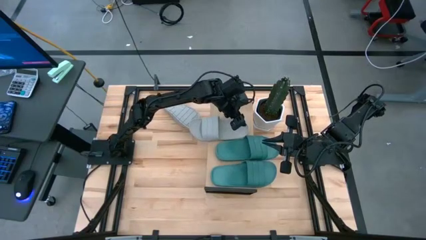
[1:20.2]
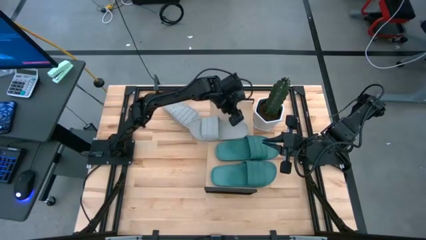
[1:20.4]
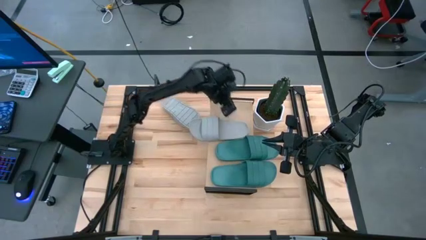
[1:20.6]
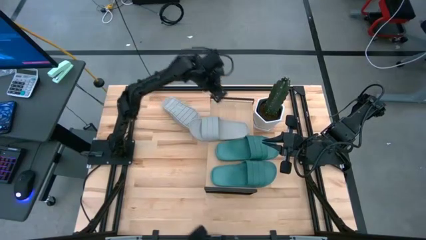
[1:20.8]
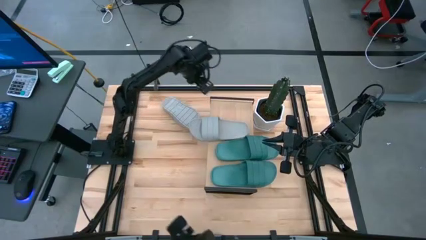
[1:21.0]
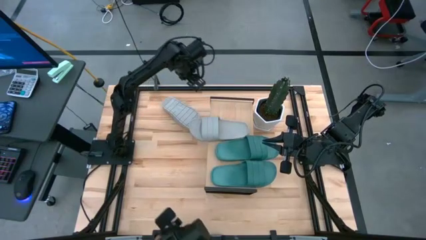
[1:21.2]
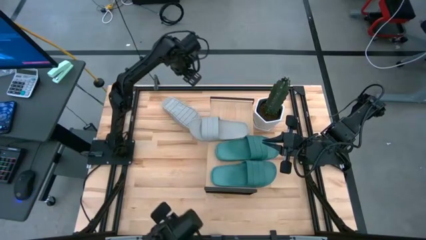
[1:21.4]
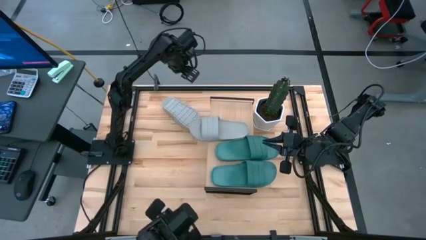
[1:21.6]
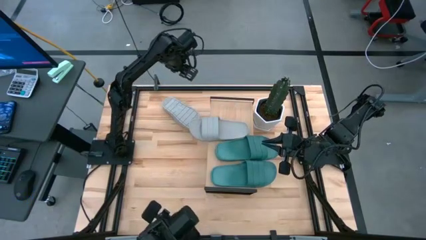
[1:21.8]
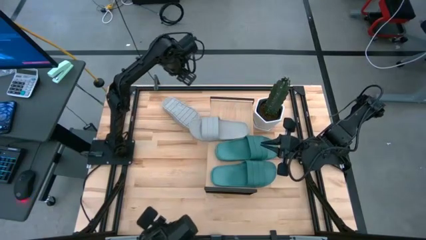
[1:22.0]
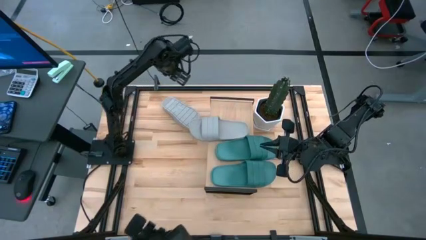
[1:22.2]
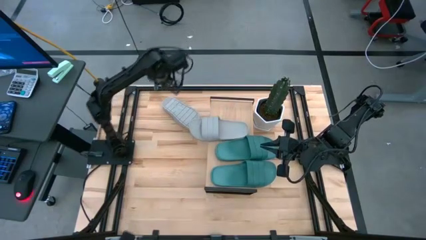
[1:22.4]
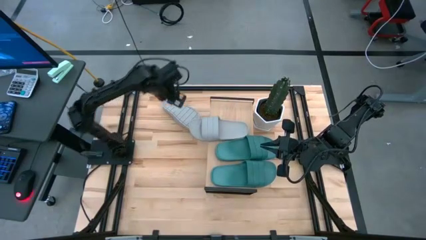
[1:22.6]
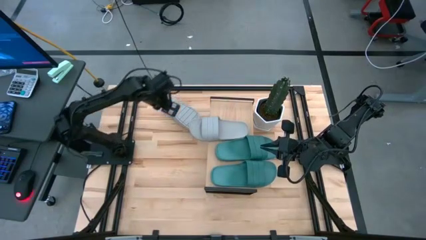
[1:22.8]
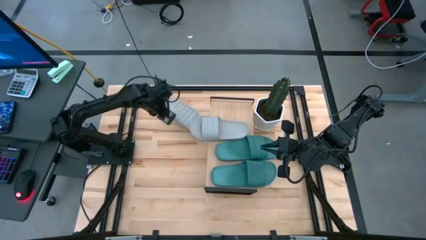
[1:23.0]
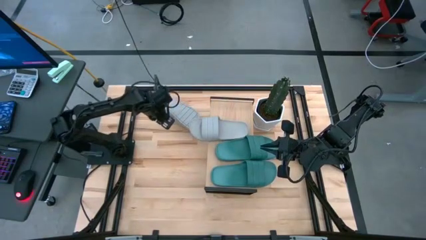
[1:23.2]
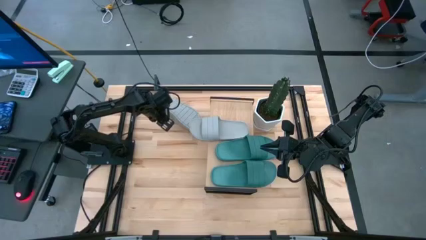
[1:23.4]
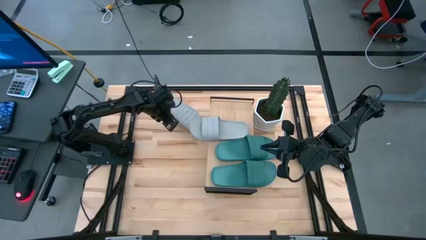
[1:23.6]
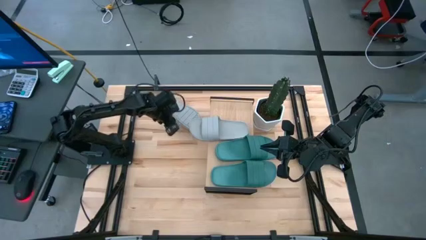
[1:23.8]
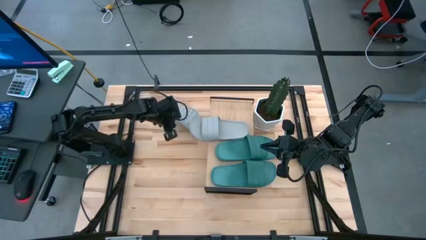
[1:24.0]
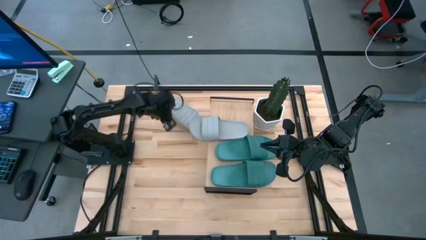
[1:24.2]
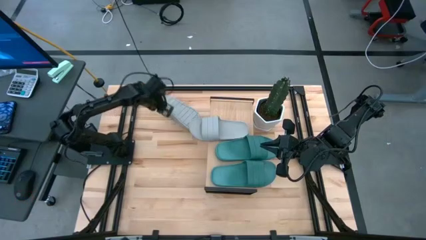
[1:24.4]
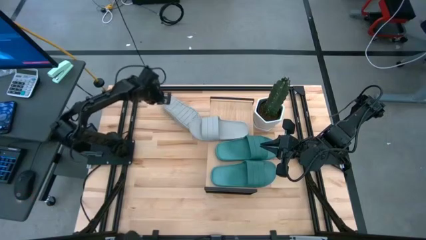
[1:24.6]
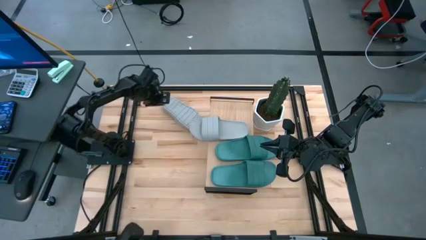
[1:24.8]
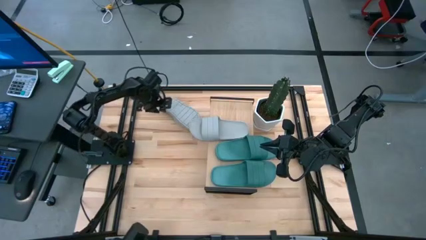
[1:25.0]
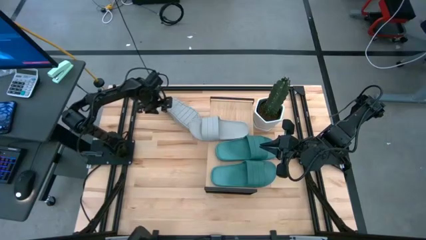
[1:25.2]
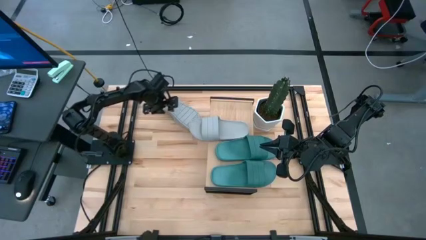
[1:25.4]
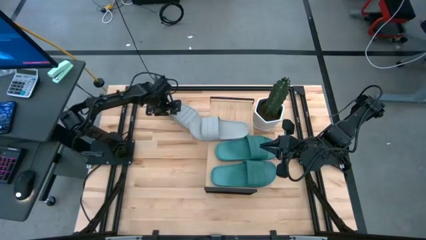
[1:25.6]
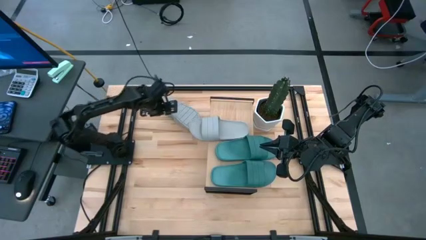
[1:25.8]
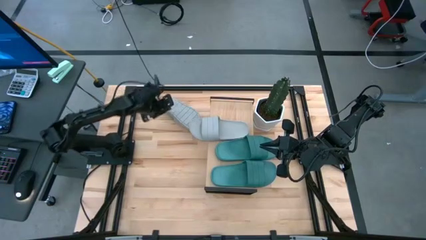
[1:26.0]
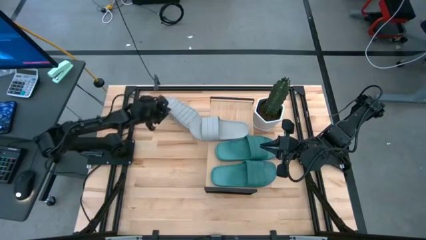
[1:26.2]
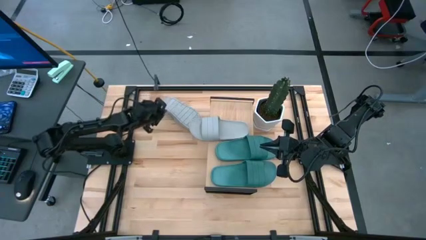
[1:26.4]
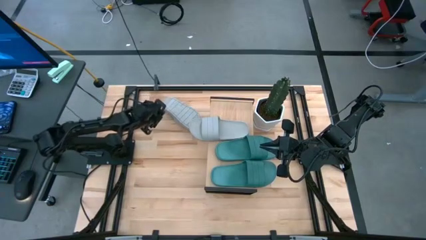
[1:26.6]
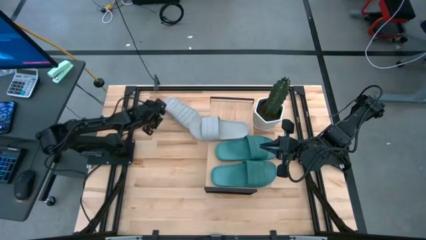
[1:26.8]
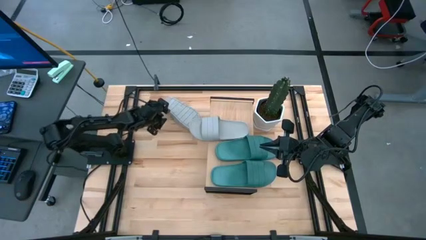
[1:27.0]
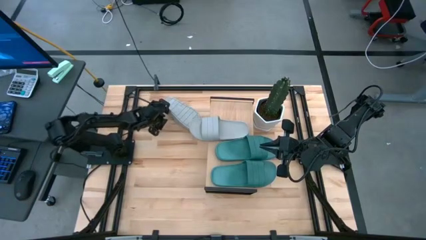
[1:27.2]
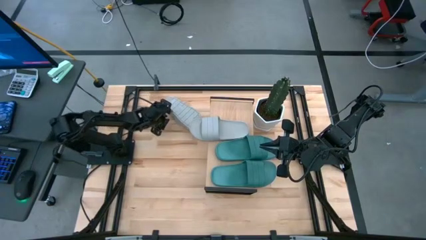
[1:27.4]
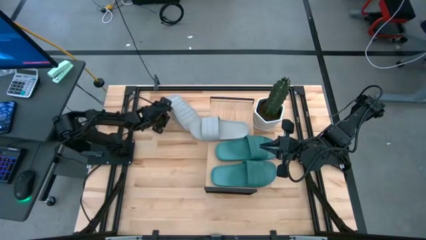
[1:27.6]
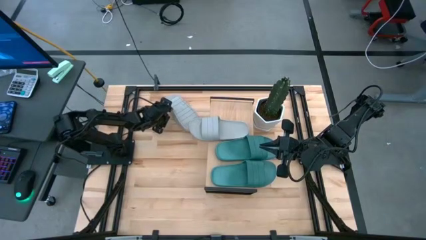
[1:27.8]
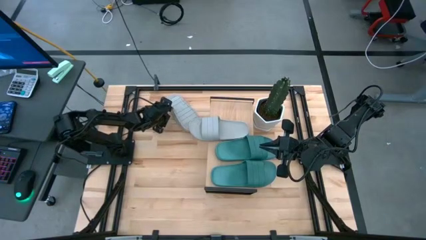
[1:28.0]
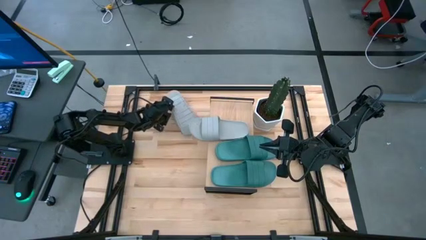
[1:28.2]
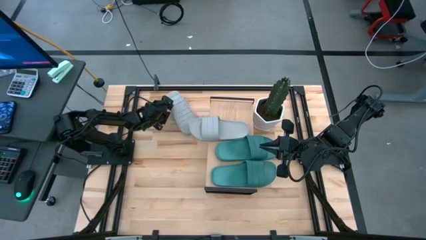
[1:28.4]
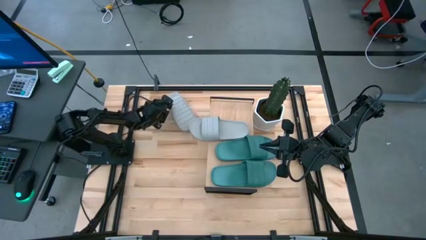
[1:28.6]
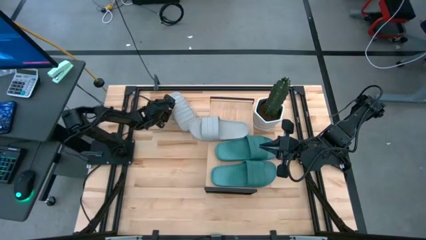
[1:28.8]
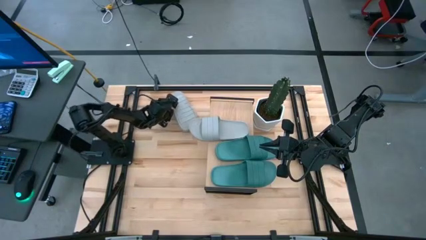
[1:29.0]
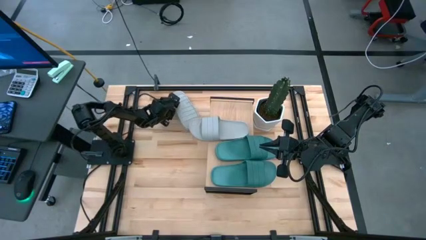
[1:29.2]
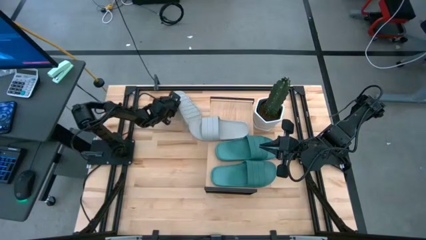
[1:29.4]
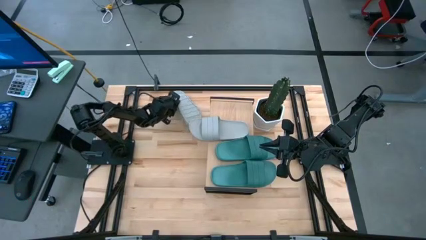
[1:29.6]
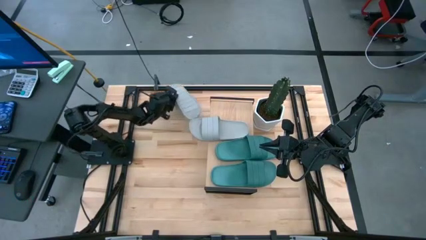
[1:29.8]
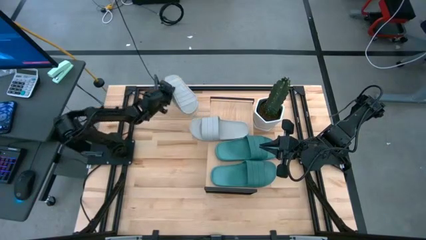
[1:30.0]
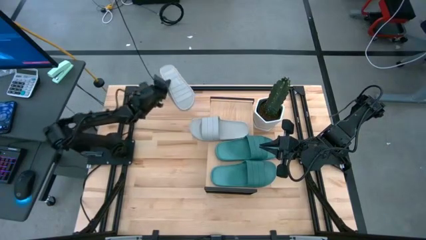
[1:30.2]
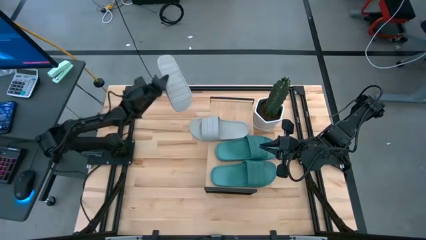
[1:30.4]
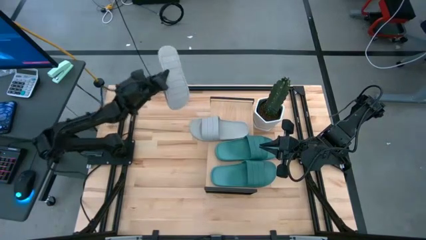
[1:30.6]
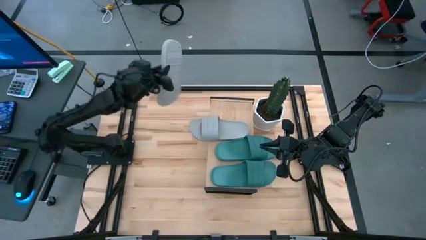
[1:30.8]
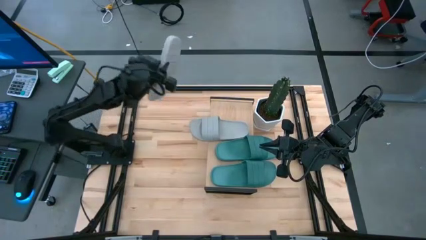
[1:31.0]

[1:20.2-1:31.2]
Task: Pick and place slides into the shelf
Put the gray slide on the shelf
